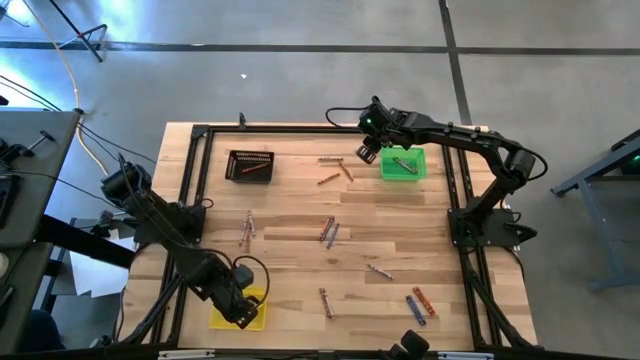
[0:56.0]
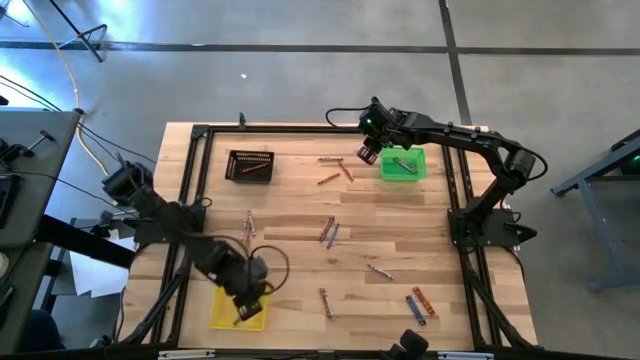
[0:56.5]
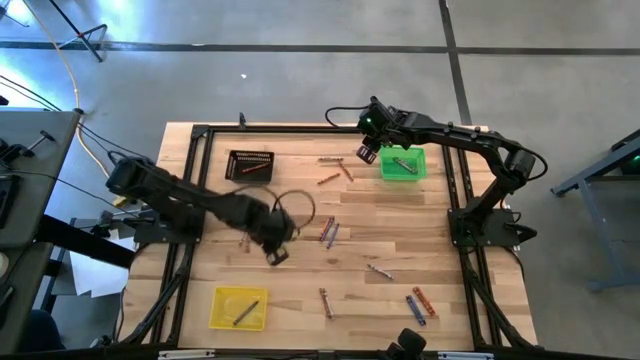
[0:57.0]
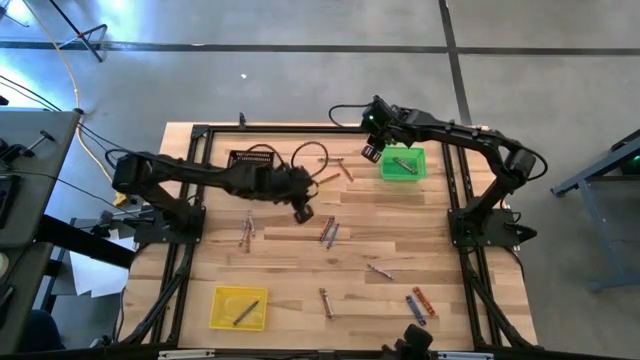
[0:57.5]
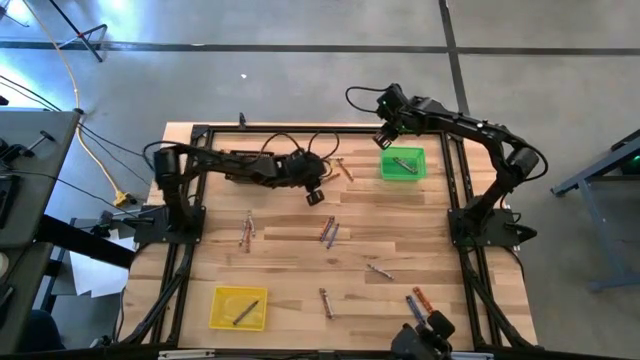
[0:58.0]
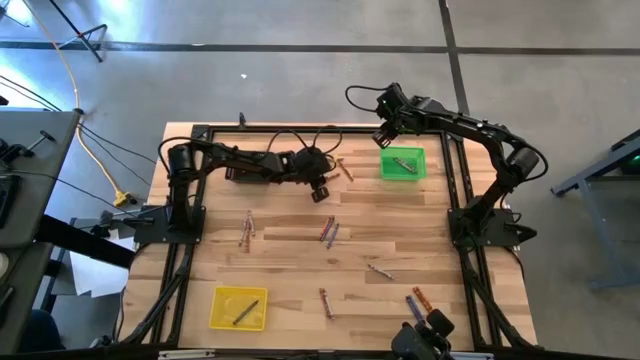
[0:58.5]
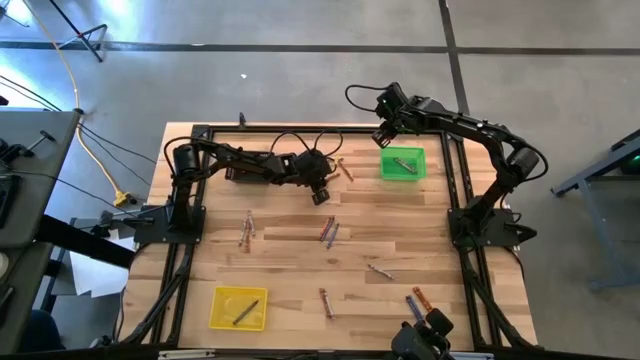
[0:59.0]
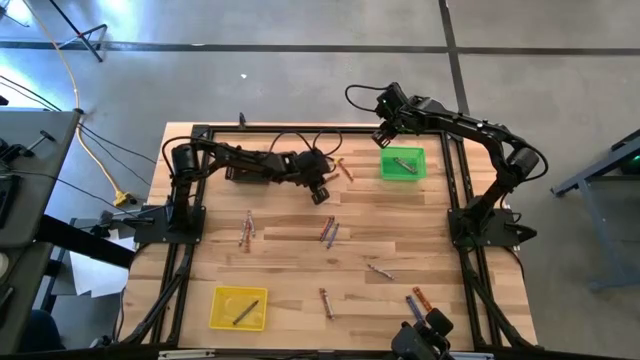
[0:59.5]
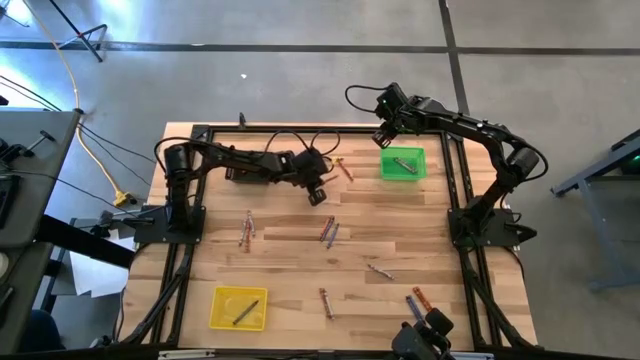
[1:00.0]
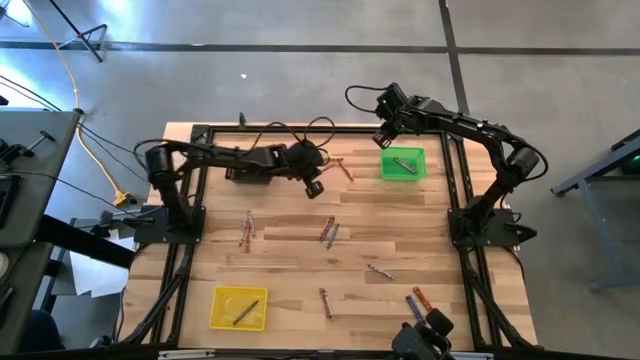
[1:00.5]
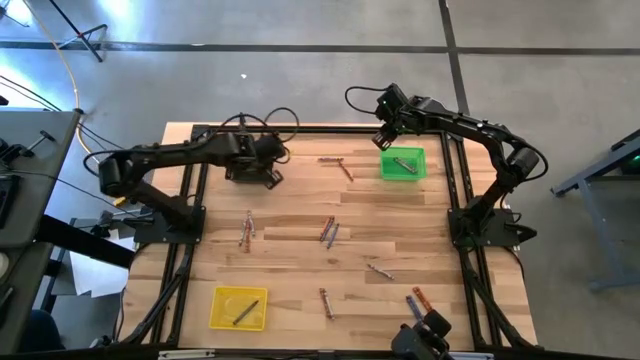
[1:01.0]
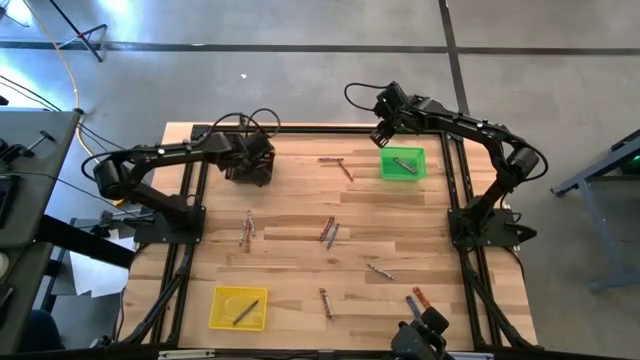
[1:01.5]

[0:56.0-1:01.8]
Task: Sort crayons
Put the orange crayon into the black bin

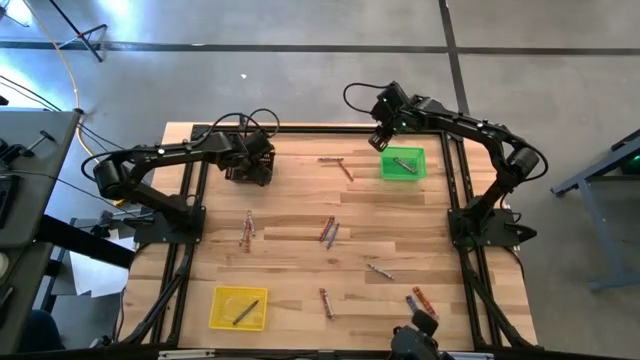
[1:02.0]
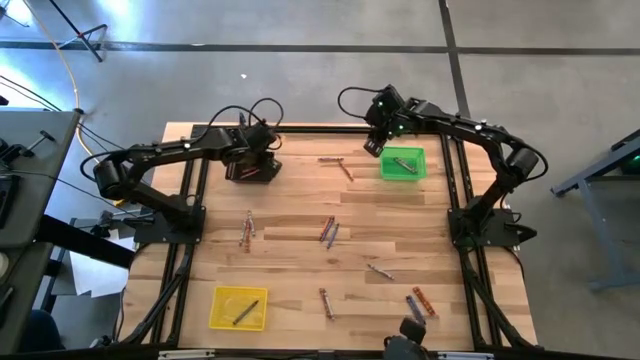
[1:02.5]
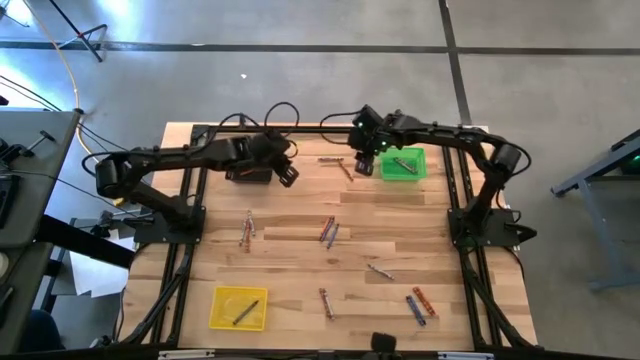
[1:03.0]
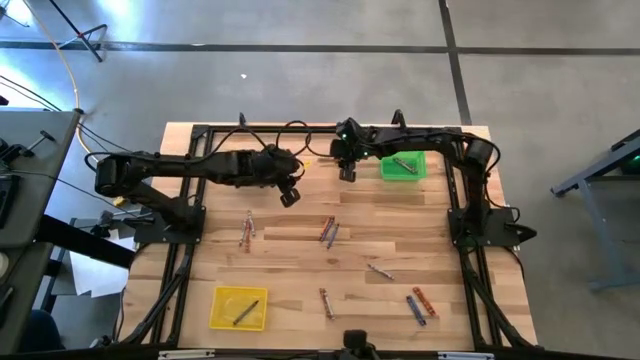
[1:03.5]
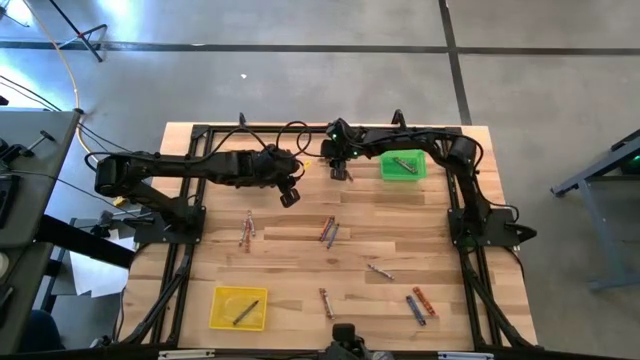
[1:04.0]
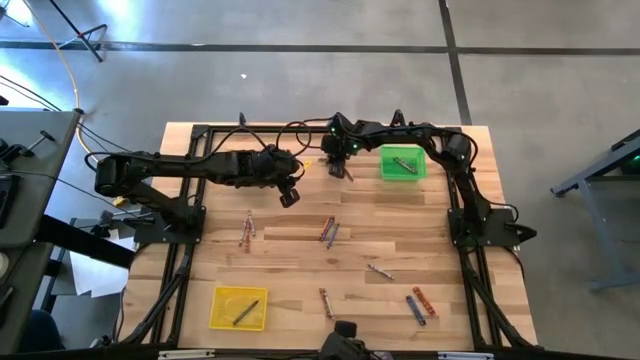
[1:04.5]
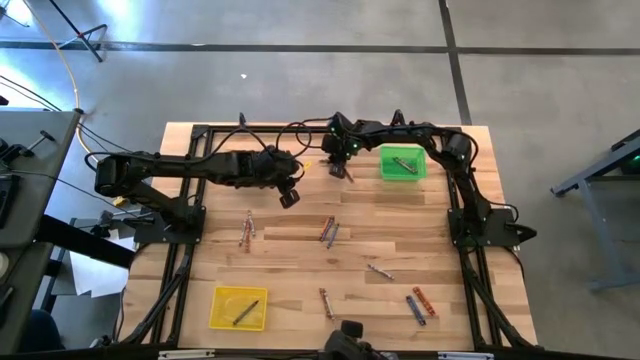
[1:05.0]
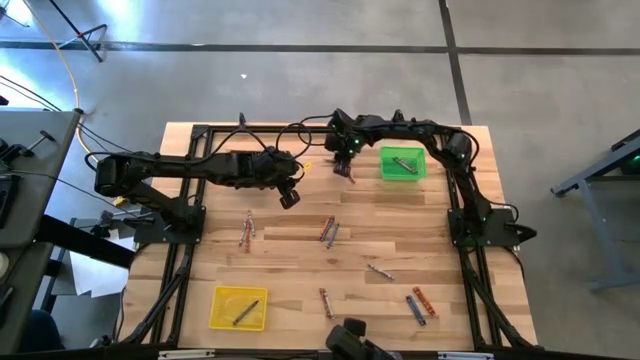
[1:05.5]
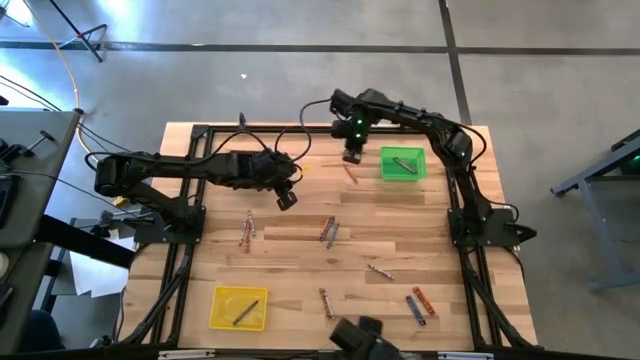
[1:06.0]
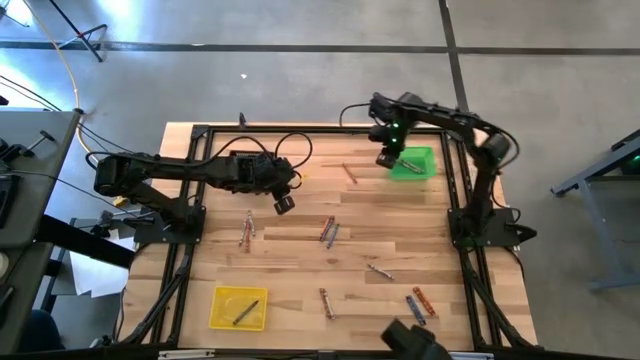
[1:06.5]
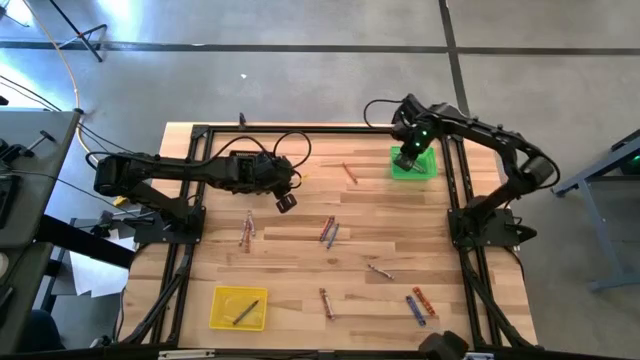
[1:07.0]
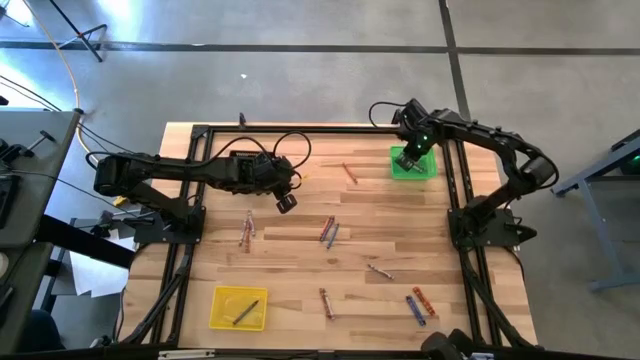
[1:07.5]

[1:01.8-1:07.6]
Put the gray crayon into the green bin

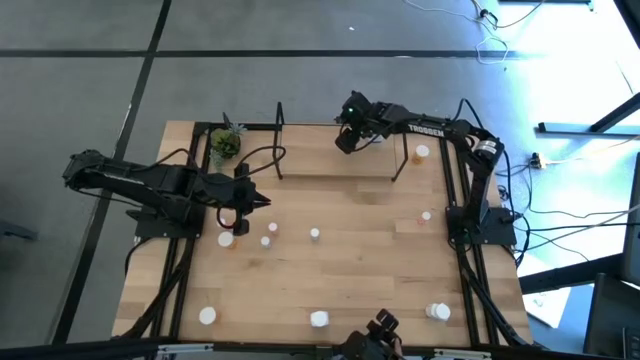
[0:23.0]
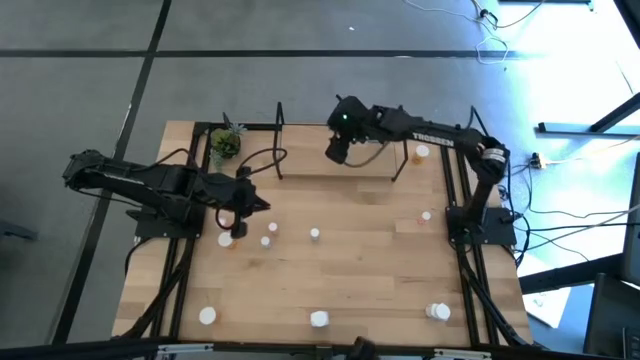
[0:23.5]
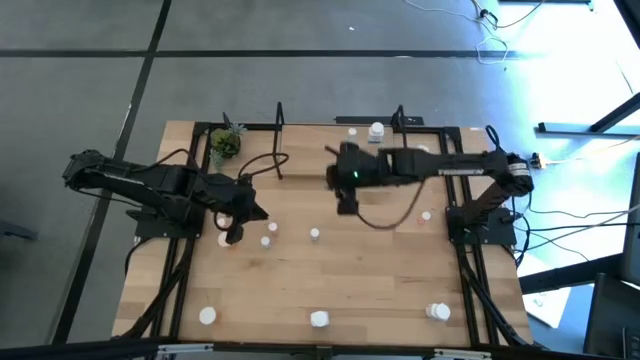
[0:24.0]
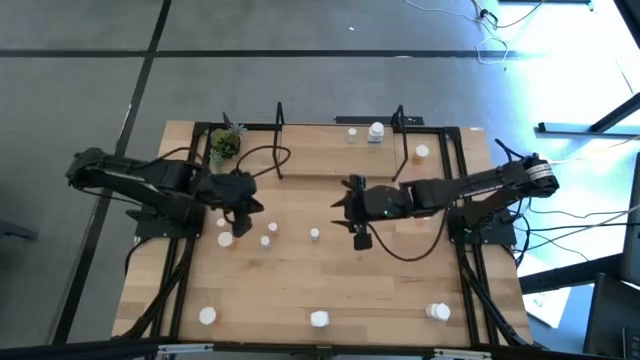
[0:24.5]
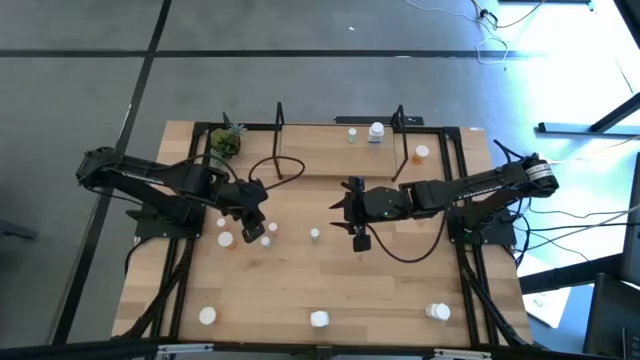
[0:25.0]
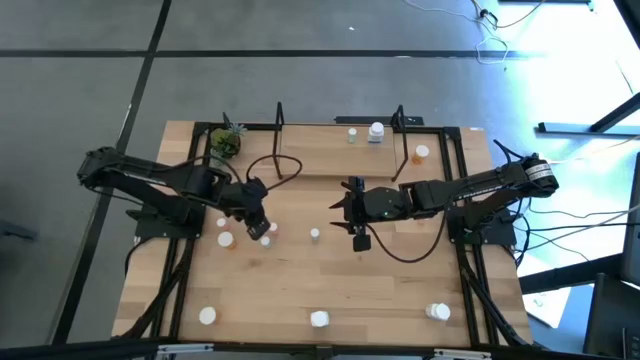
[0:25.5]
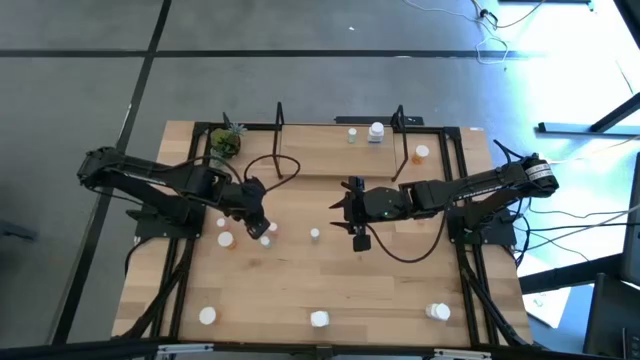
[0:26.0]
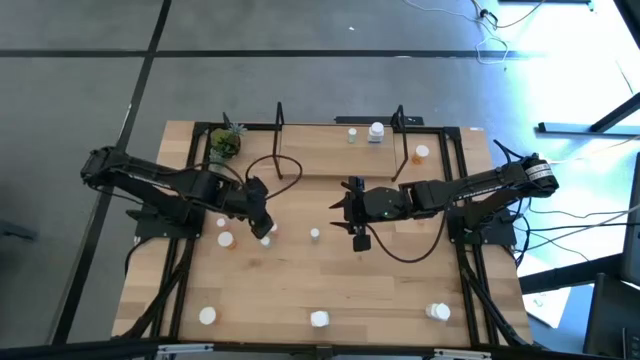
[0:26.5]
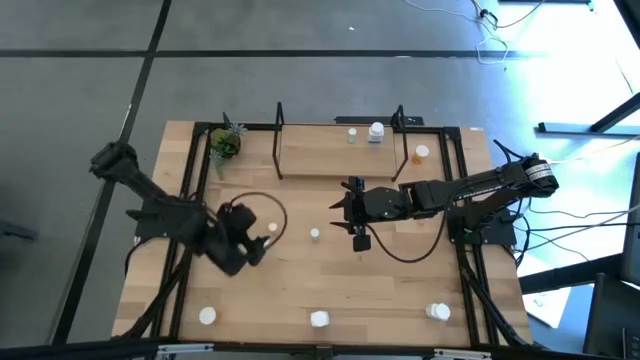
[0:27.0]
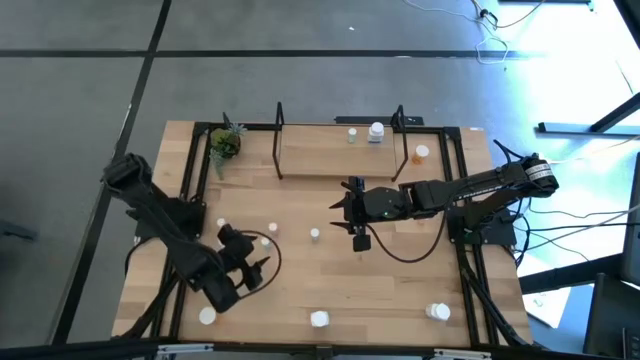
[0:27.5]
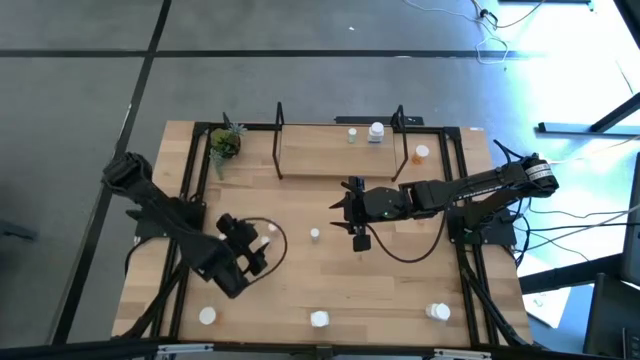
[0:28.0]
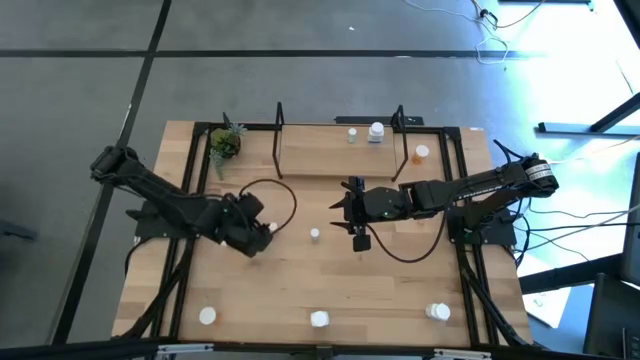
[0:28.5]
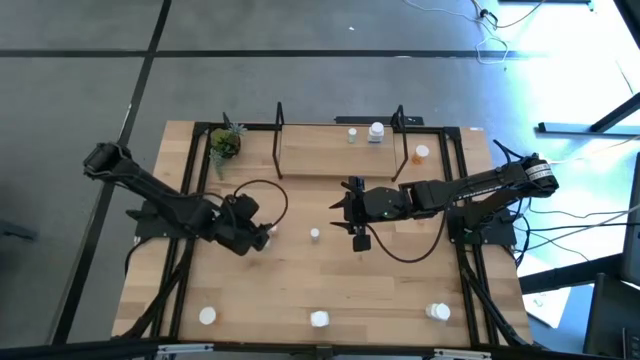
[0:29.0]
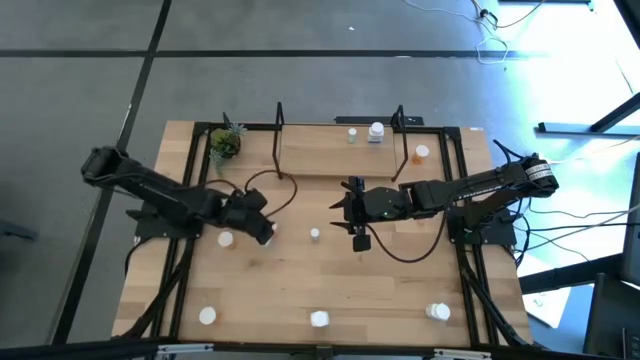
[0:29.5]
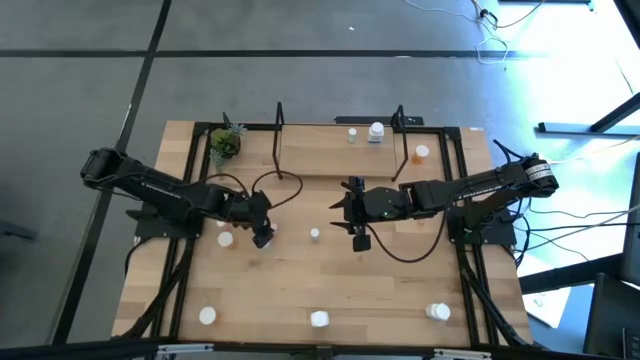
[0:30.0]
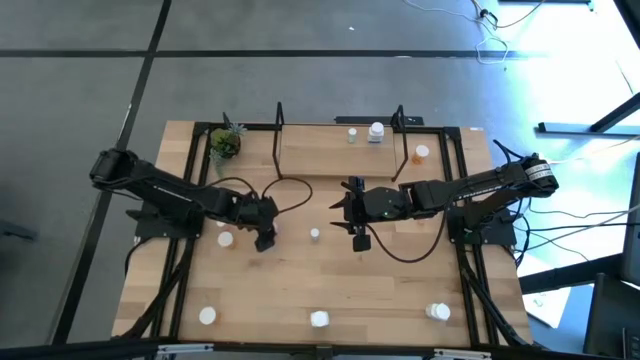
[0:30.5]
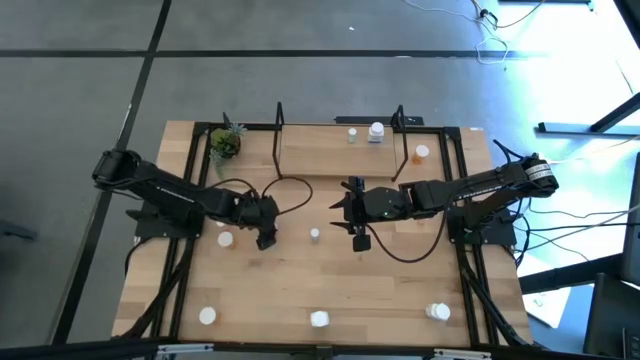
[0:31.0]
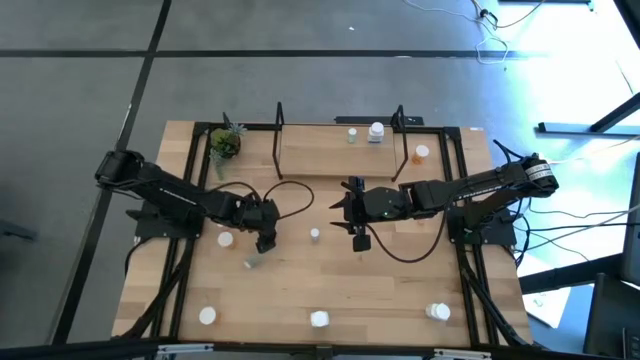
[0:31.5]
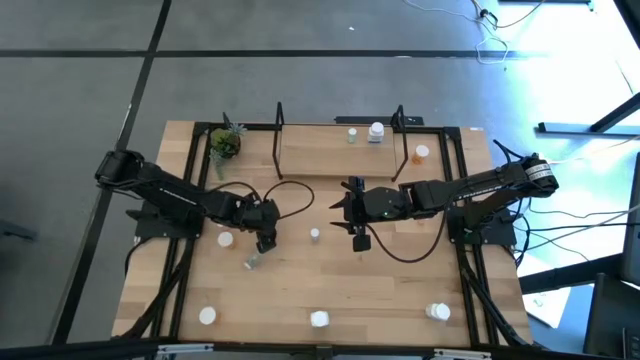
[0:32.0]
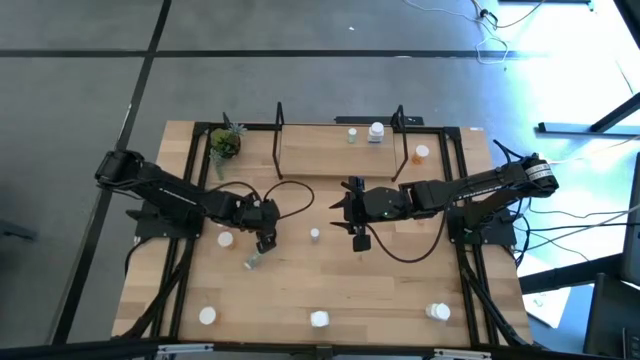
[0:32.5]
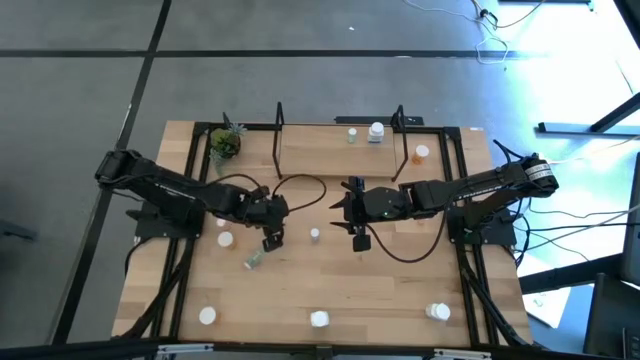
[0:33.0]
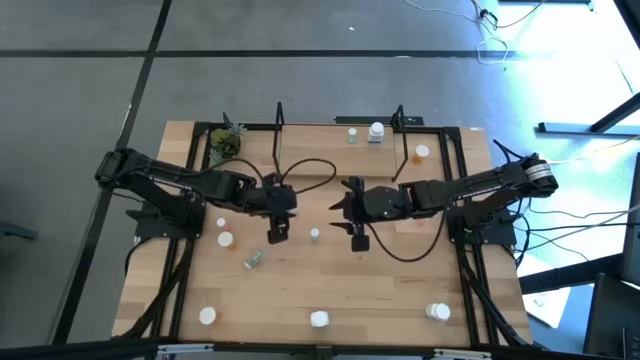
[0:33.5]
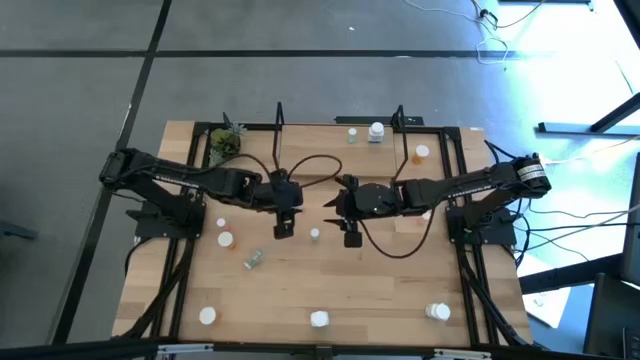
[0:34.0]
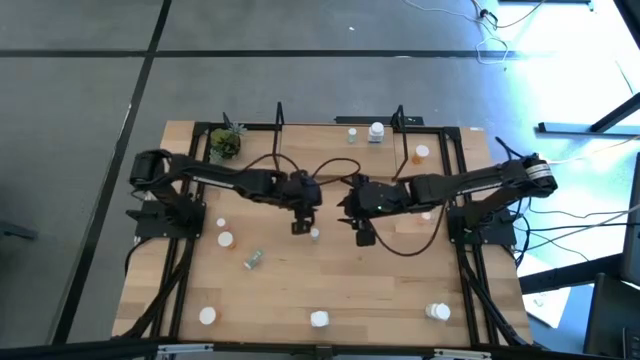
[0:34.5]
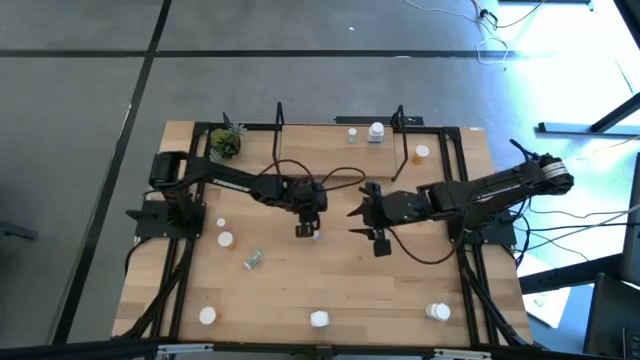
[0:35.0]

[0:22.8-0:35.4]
Task: Pick and place medicine bottles onto shelf by color
Put the middle pink pill bottle on the shelf
